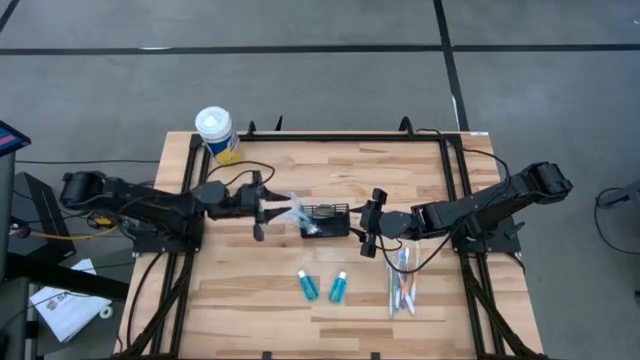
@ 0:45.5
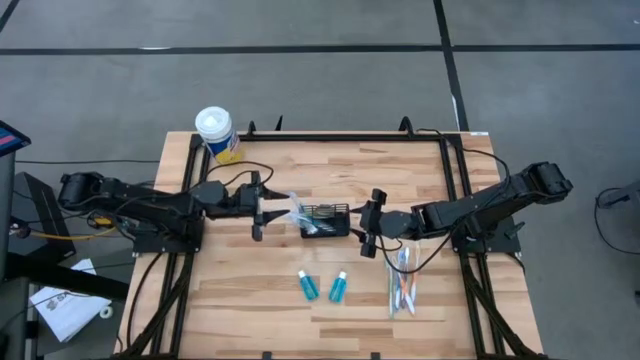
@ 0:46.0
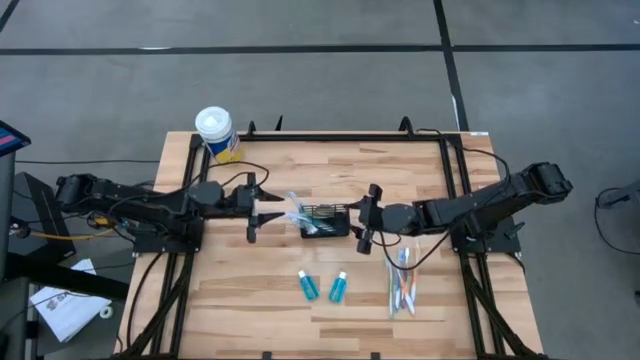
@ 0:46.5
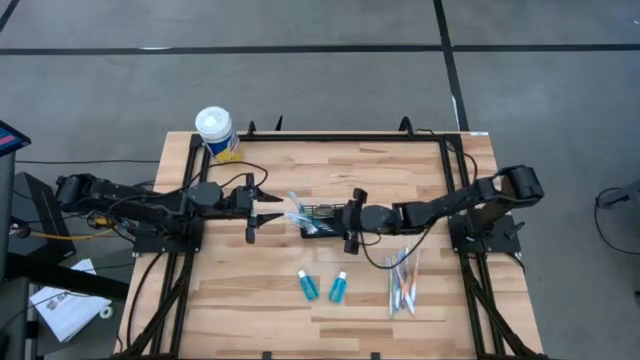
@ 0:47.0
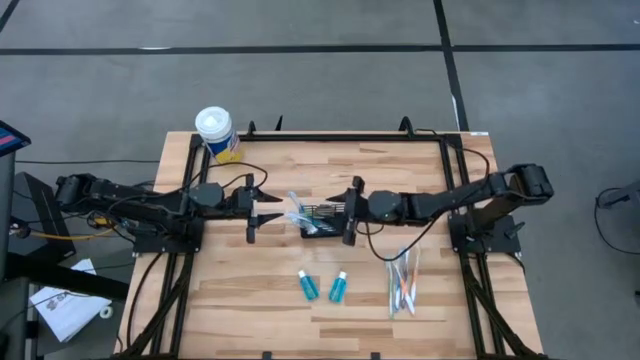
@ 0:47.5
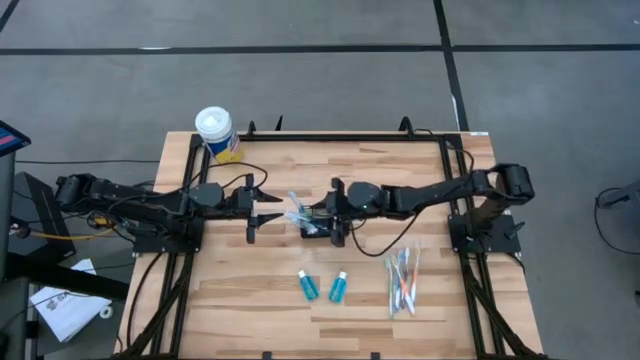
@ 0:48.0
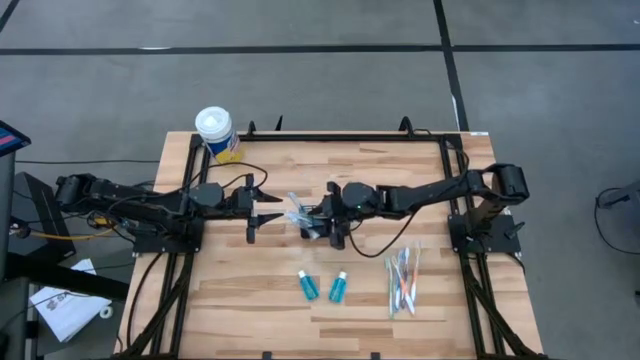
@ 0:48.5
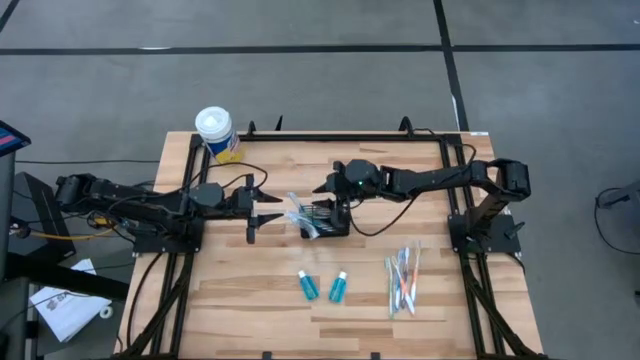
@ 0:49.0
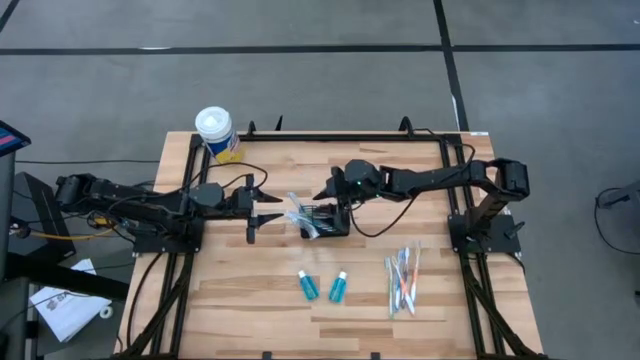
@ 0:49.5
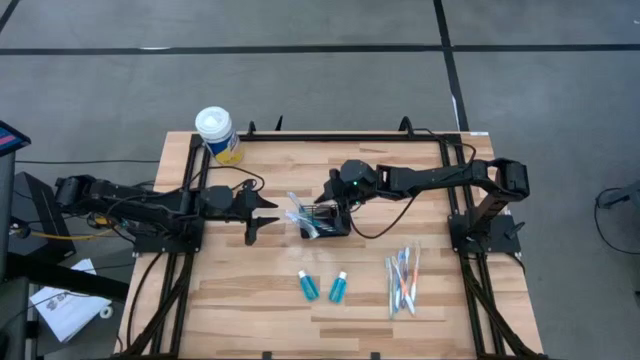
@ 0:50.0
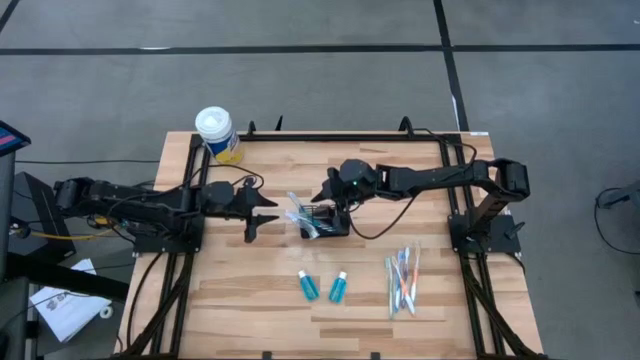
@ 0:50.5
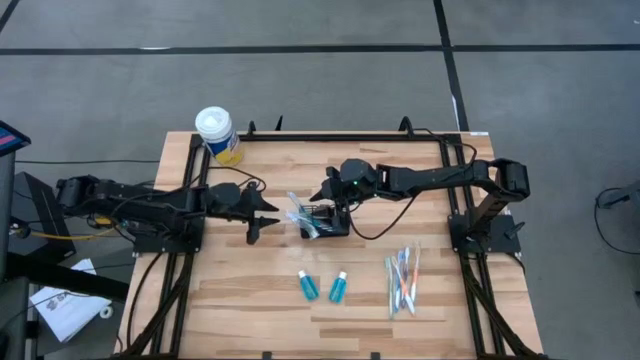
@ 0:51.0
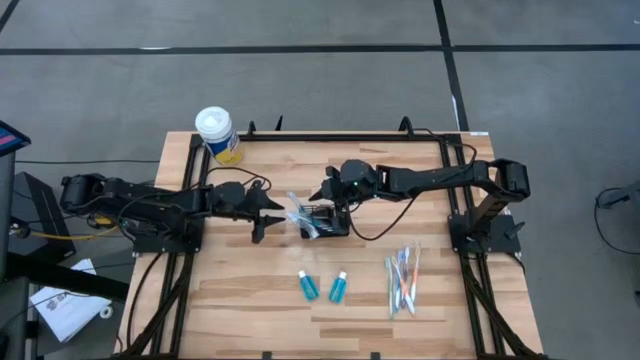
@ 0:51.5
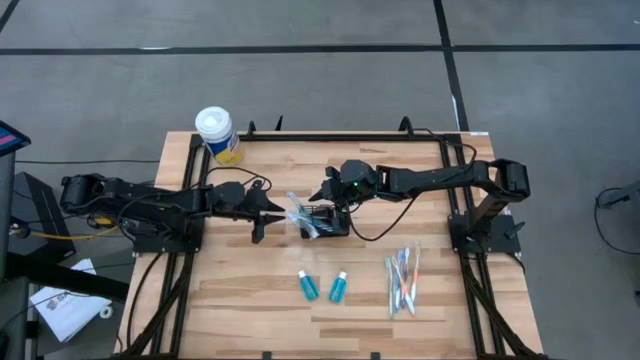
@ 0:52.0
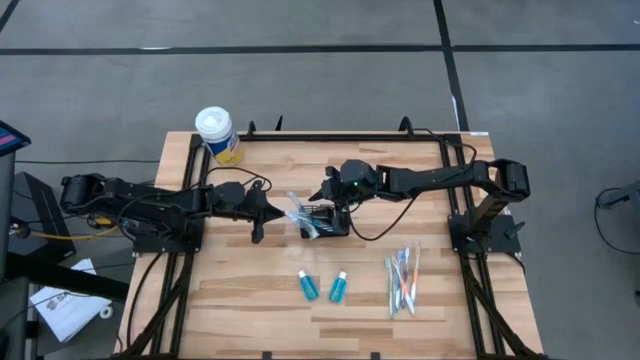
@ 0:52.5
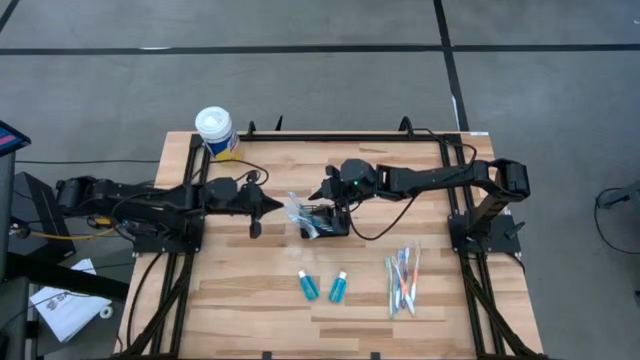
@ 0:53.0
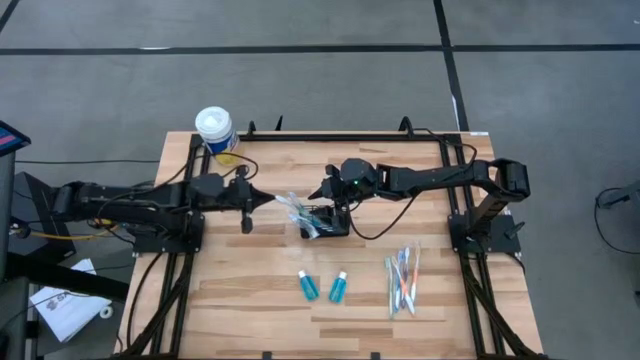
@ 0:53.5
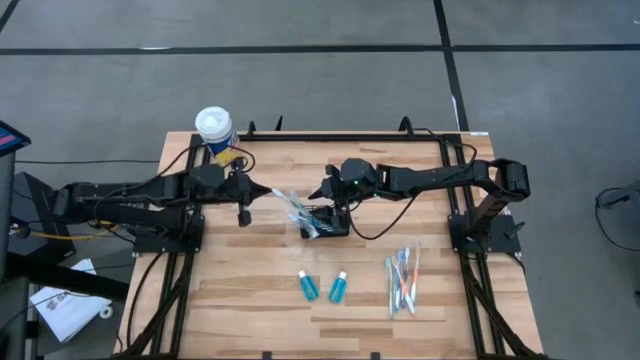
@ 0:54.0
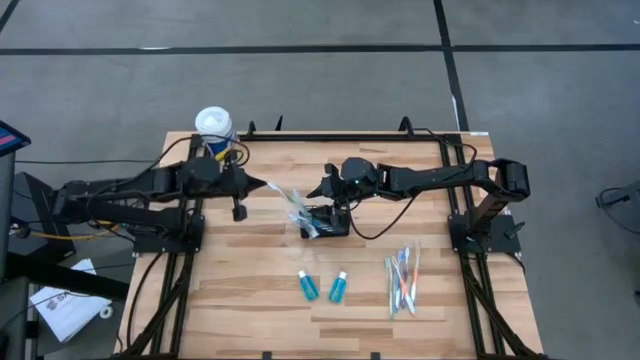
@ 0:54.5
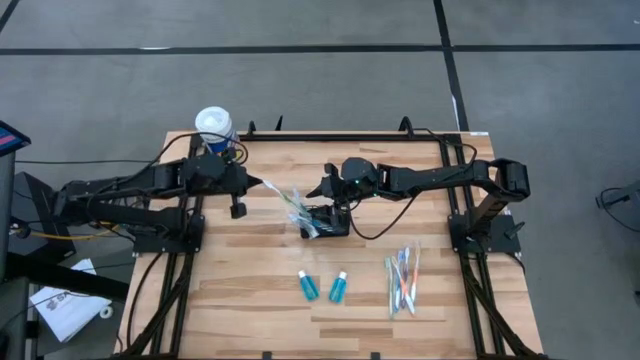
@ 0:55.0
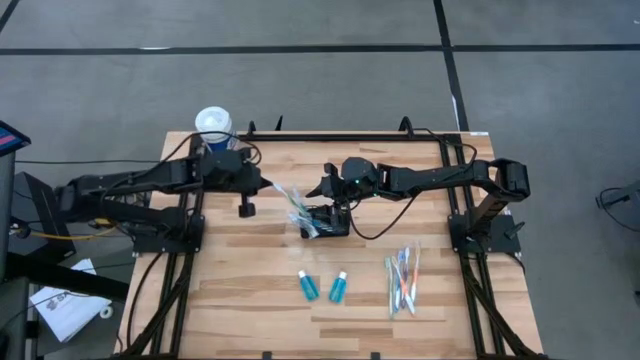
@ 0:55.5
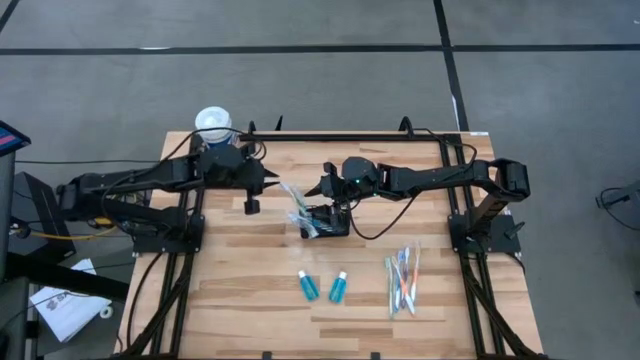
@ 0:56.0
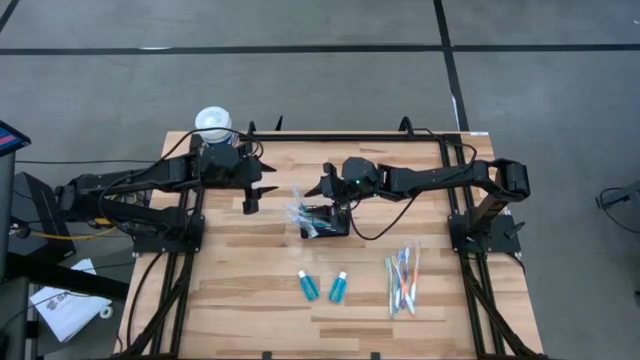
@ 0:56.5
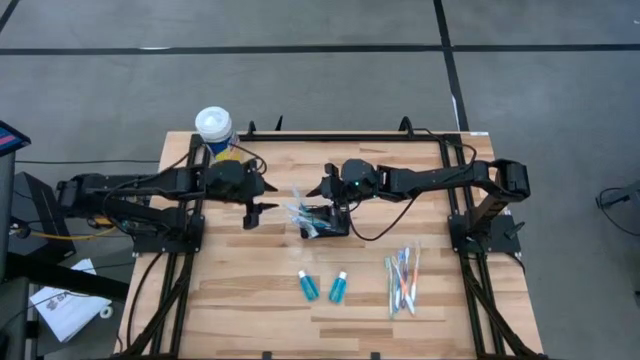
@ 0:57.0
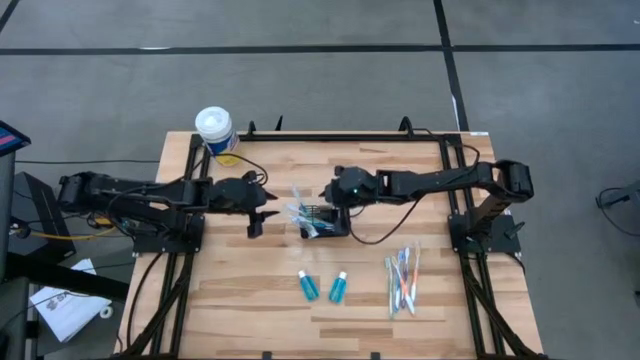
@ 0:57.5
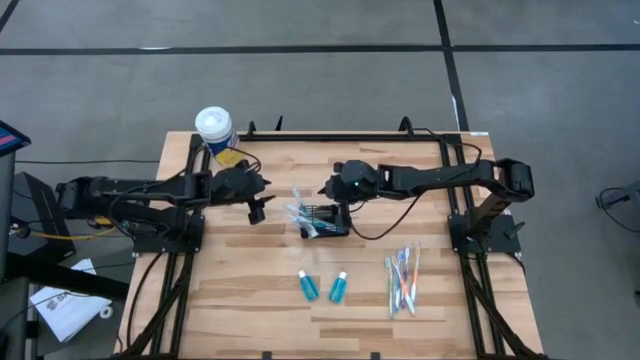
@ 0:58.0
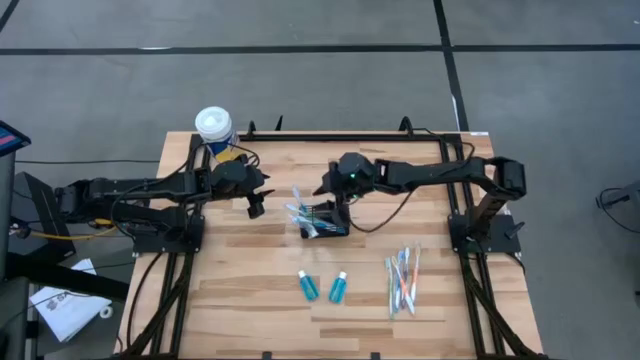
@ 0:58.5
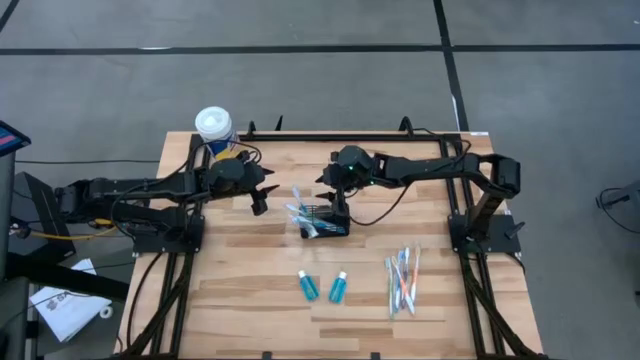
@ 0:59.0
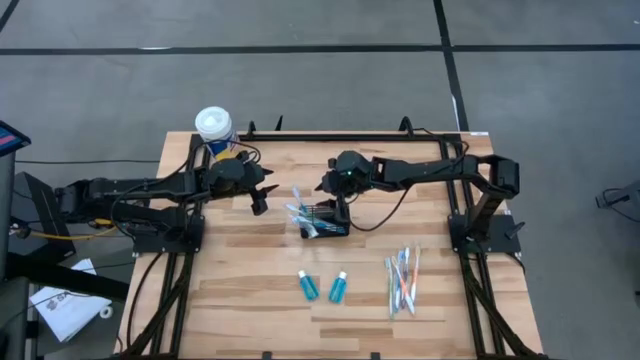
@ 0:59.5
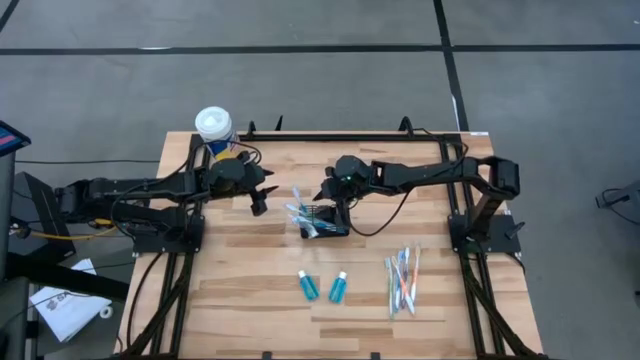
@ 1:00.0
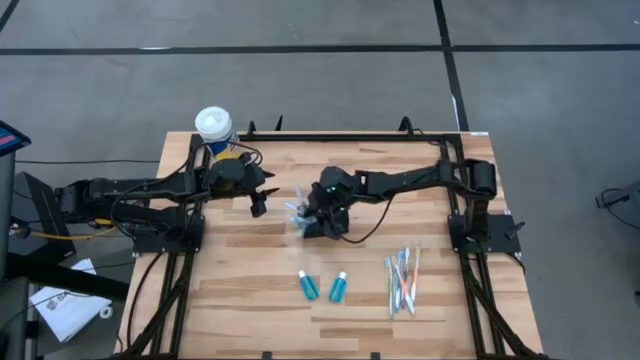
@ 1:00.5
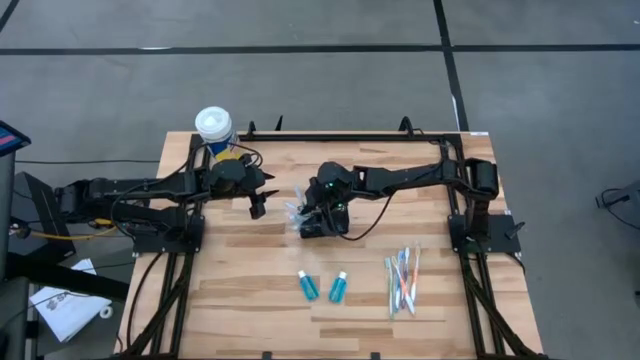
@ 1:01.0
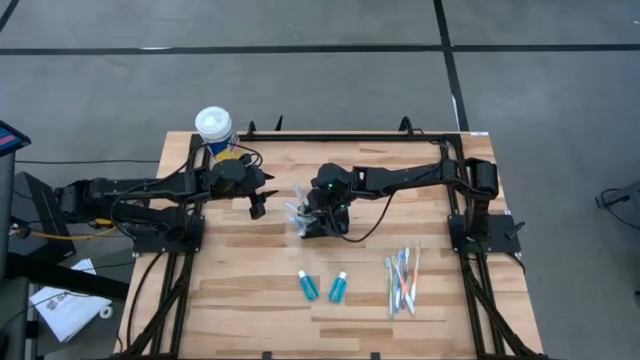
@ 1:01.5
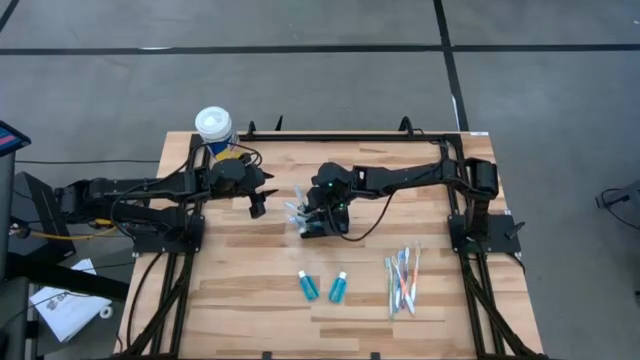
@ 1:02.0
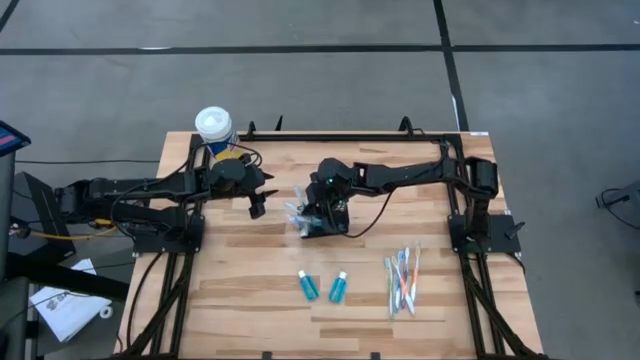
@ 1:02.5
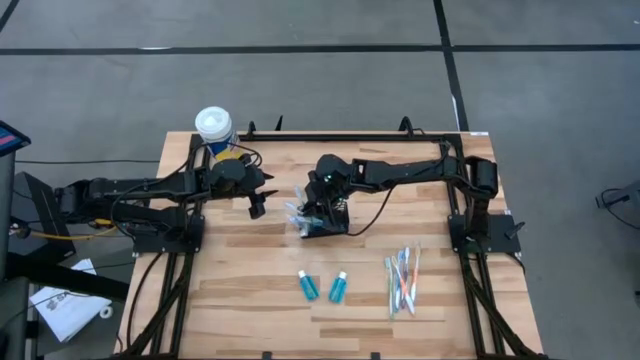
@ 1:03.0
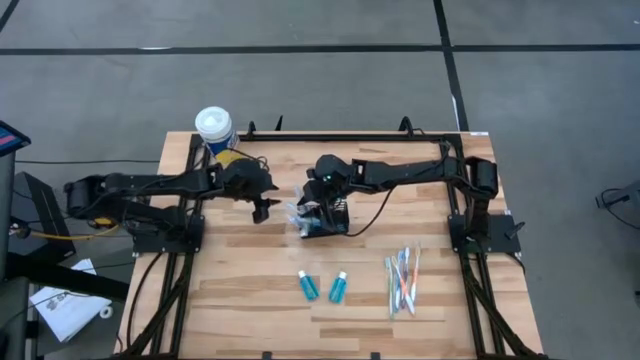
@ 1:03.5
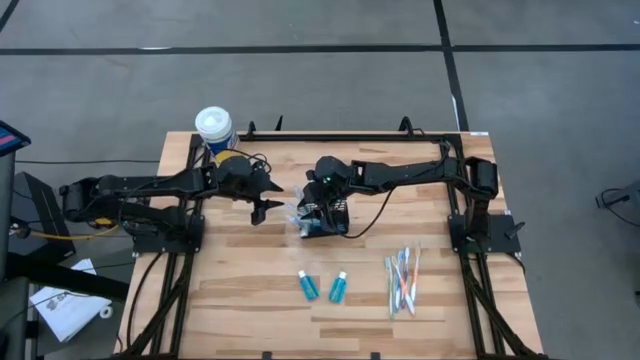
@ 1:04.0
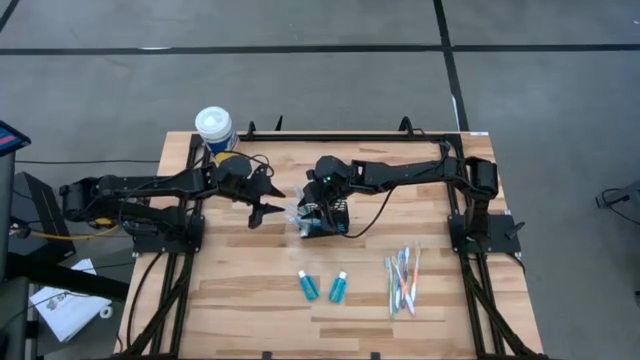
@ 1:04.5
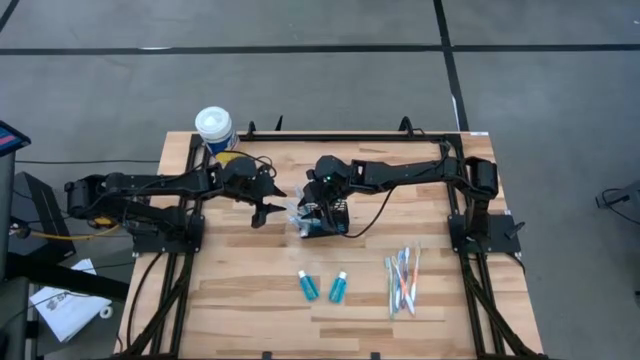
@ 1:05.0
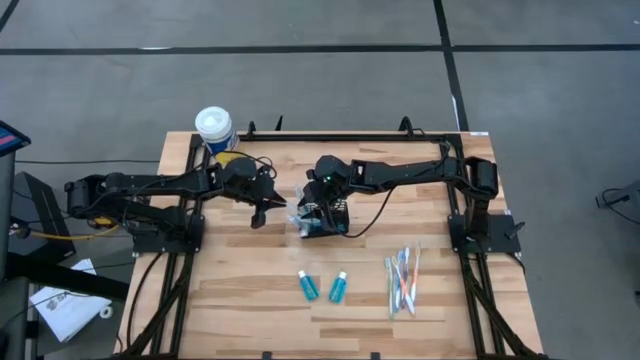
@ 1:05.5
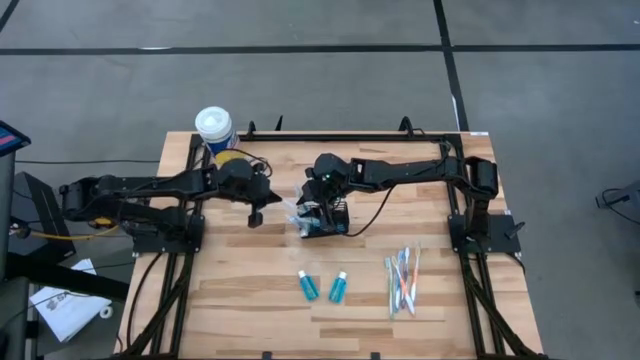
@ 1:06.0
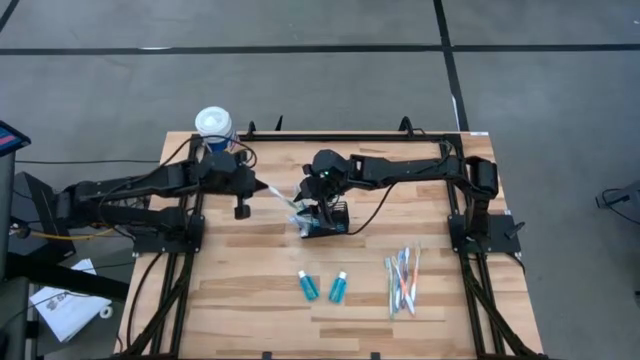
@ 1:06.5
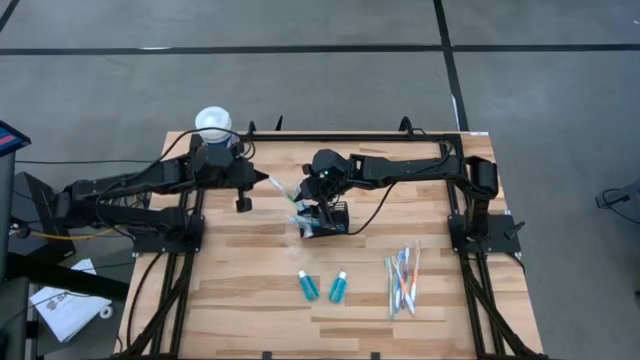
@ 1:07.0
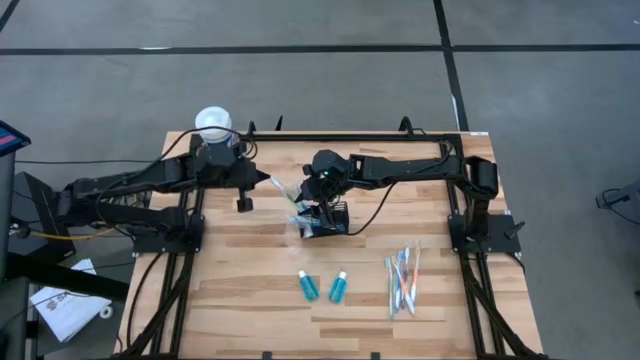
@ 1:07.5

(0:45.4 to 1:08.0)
Task: Pick & Place toothbrushing station
Adjust toothbrushes inside the mesh
